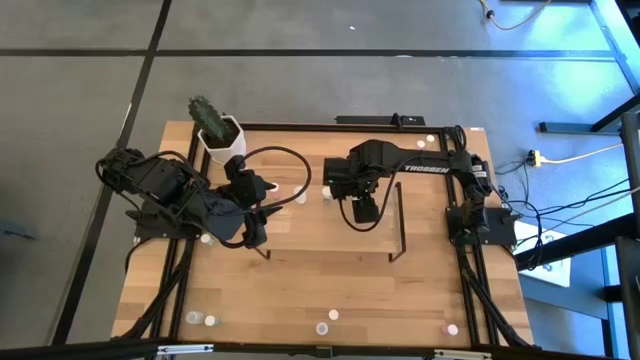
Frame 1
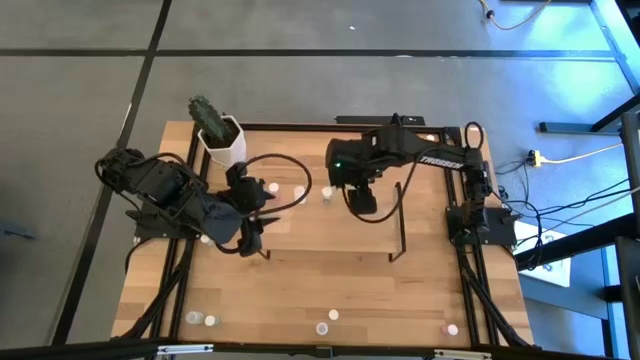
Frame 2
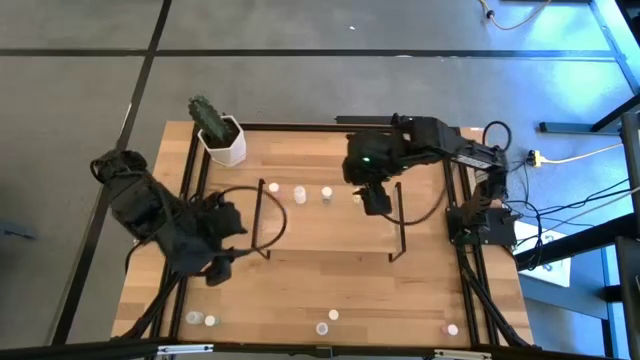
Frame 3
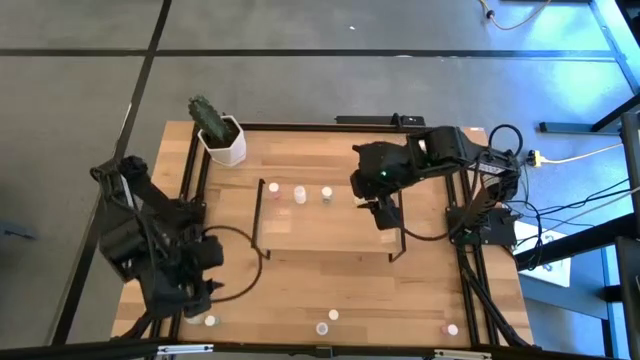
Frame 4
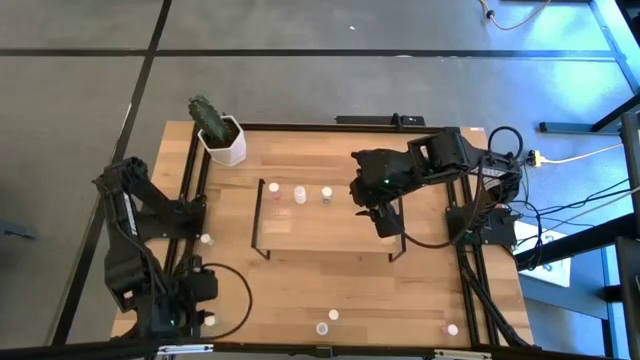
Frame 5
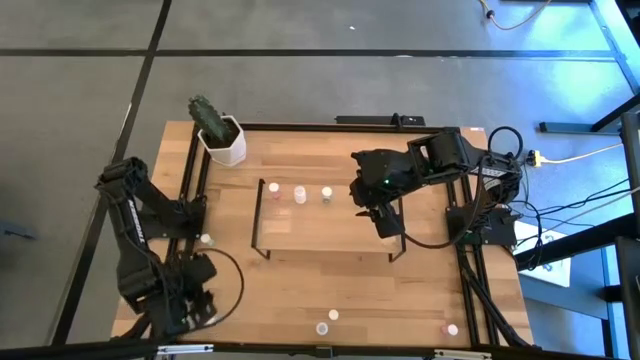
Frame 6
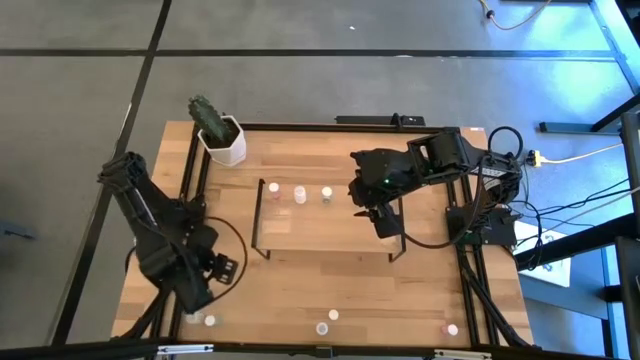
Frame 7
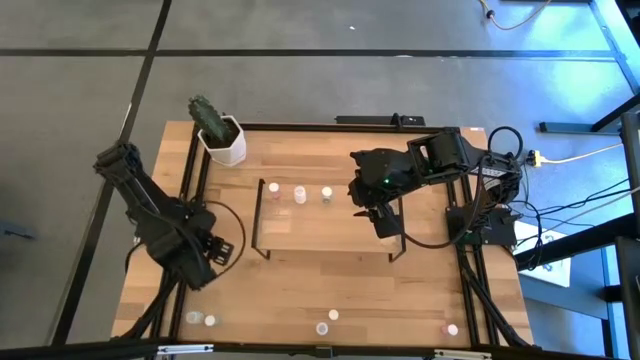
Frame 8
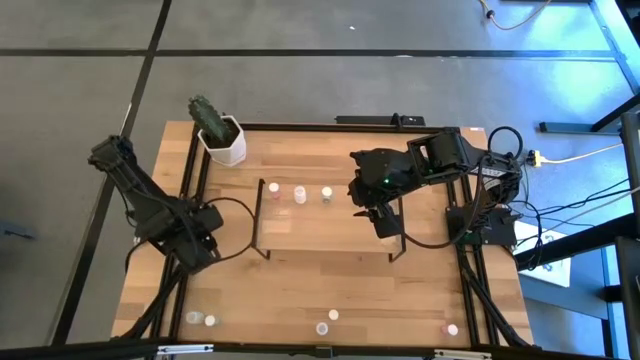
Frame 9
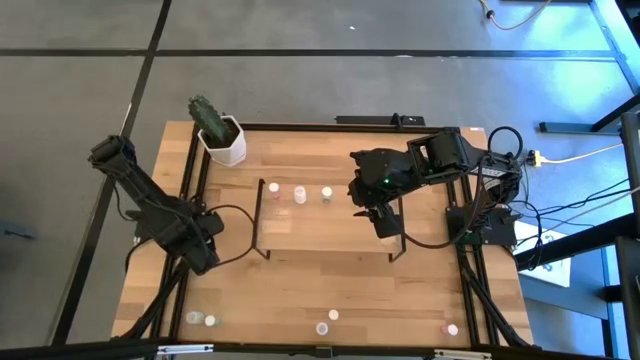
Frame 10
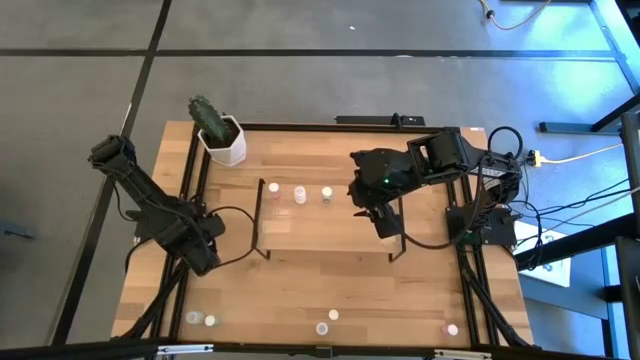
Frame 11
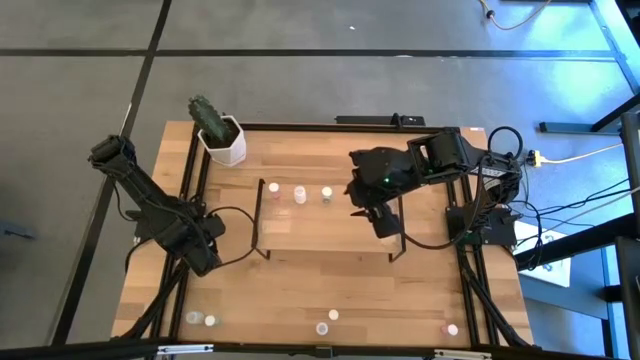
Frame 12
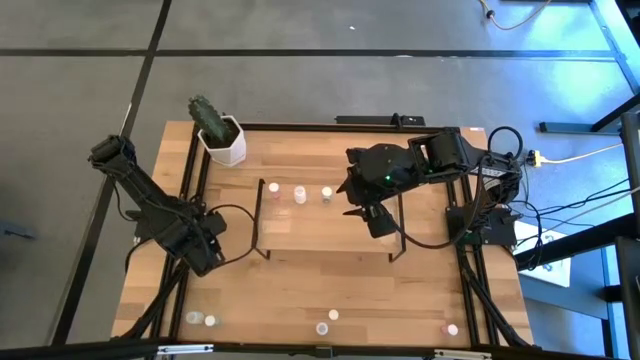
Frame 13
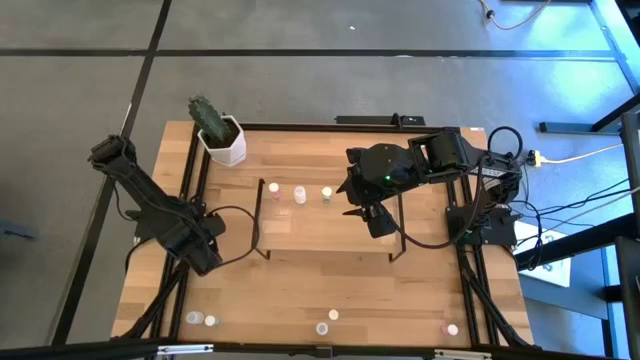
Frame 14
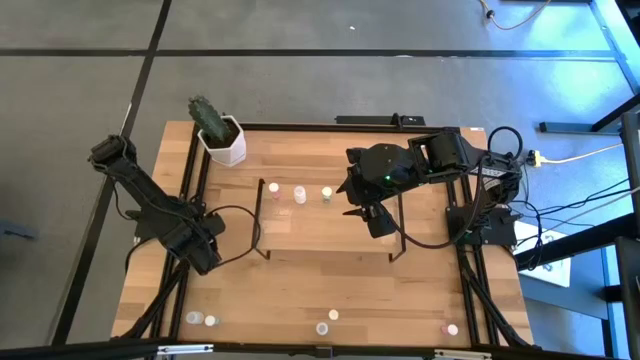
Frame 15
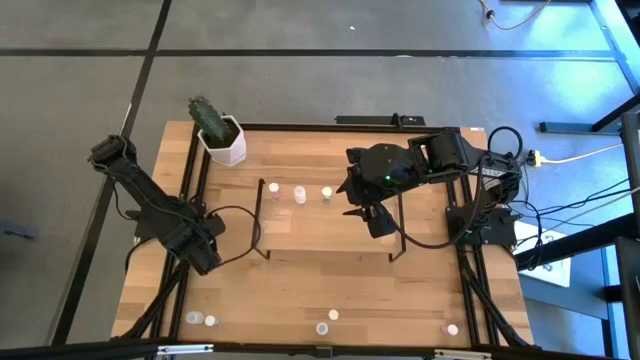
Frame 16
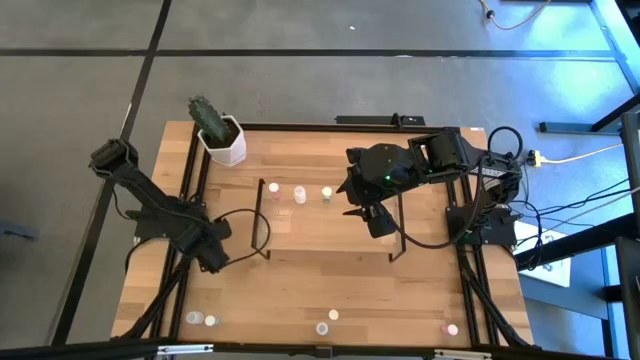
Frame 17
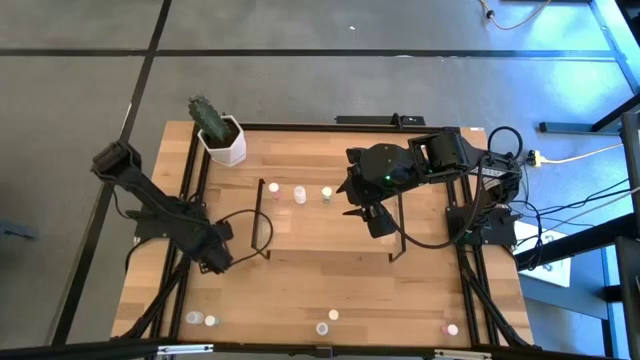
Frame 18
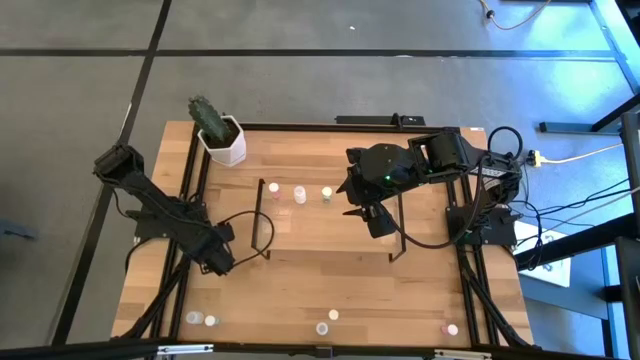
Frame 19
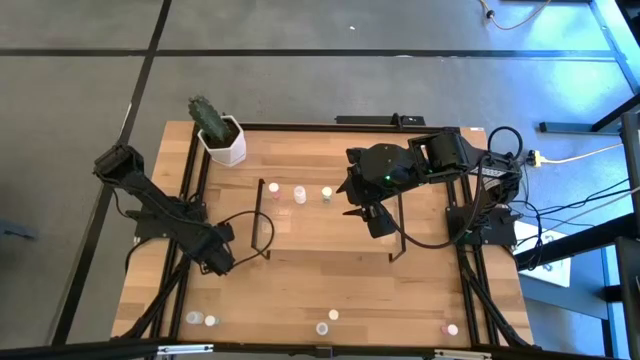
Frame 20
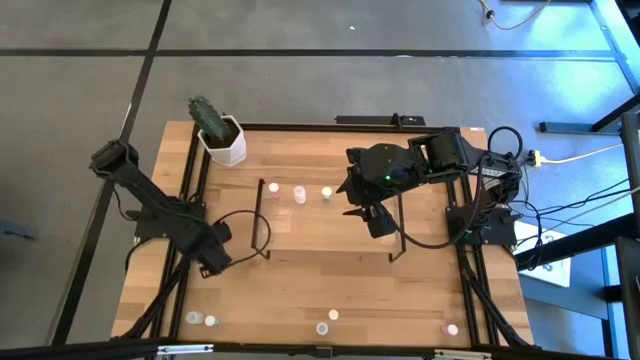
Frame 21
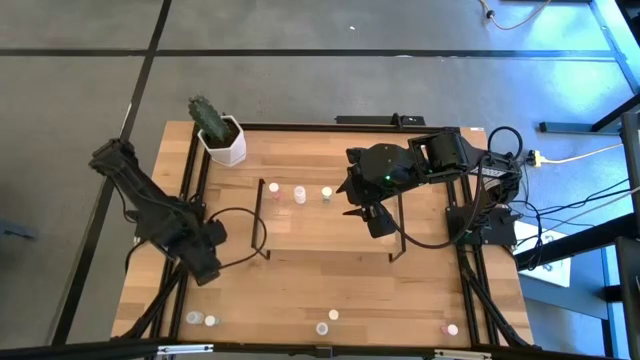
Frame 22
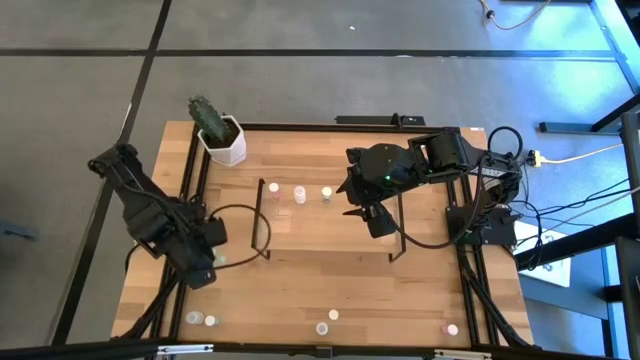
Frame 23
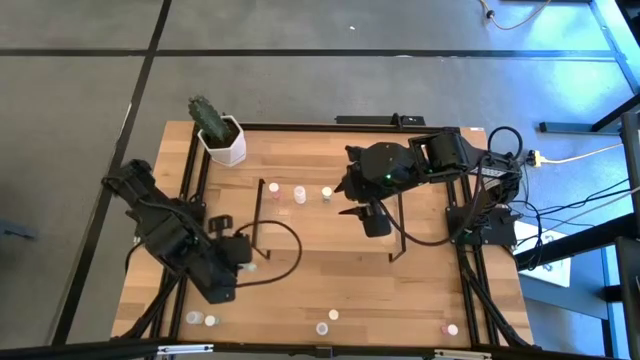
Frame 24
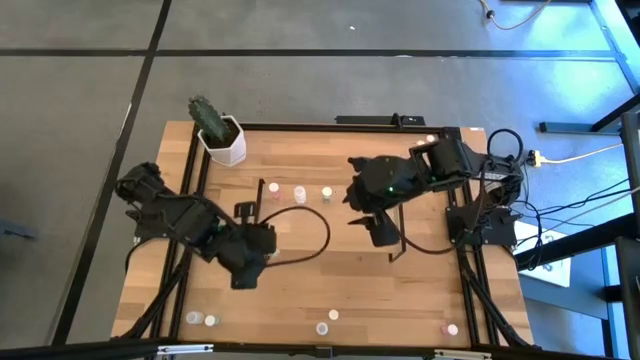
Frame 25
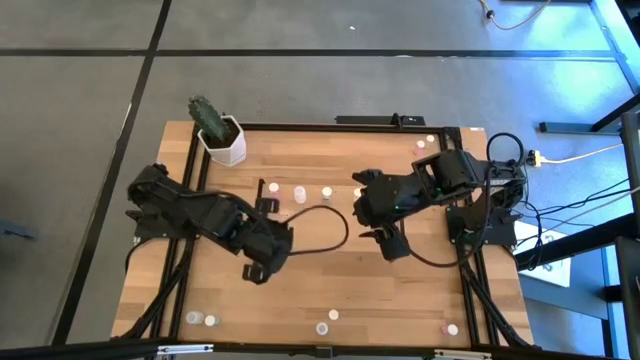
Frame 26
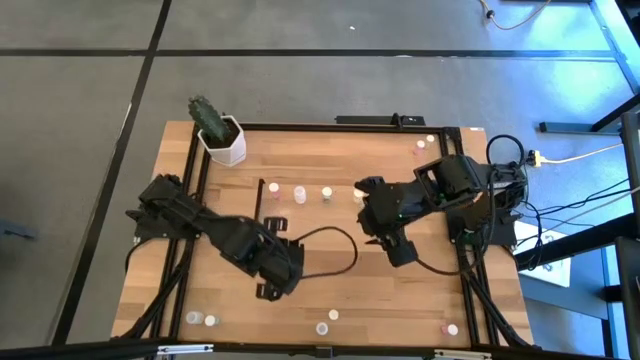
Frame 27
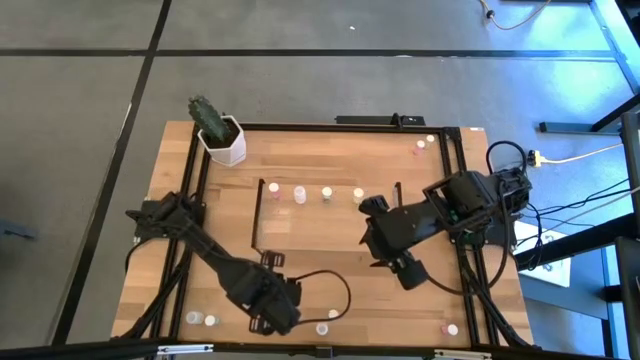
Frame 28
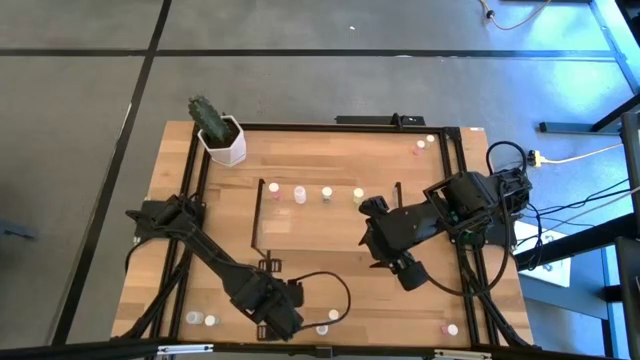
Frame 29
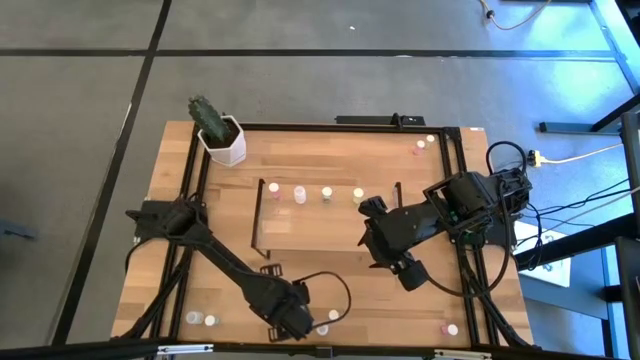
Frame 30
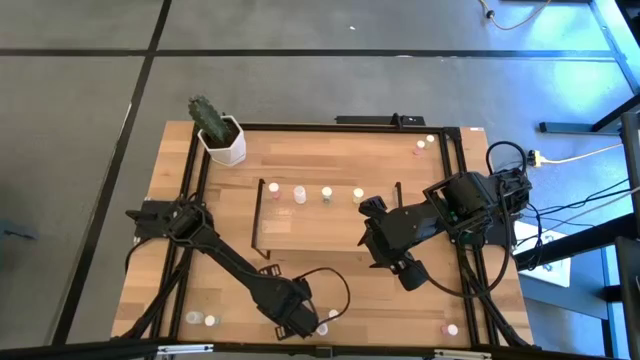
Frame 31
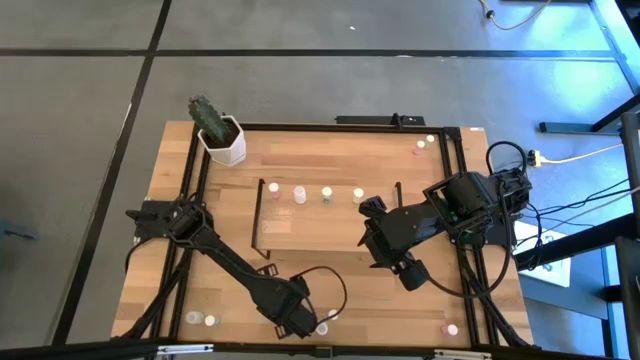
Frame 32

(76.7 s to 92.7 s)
Task: Pick and place medicine bottles onto shelf by color
Put the top blue pill bottle on the shelf aligned with the other blue pill bottle

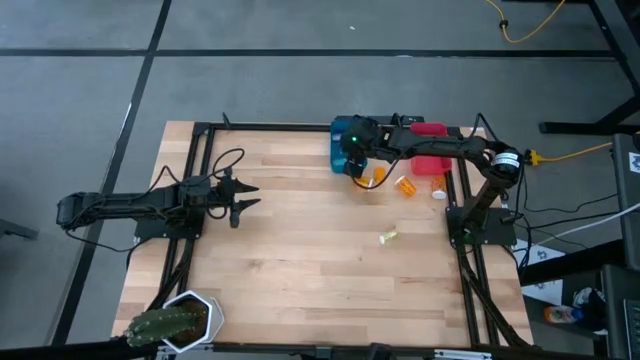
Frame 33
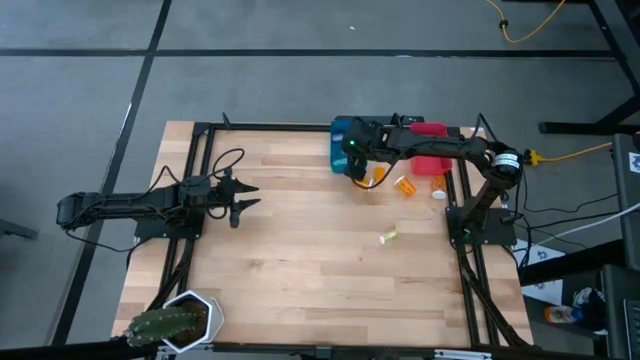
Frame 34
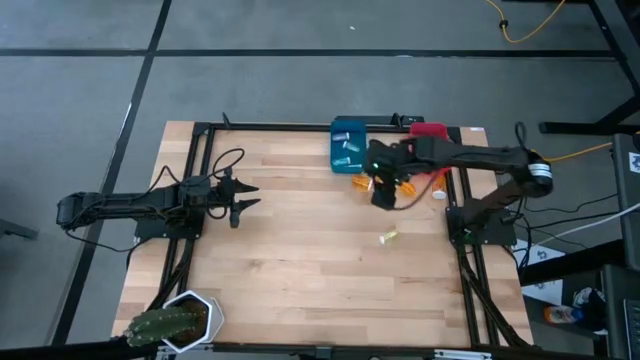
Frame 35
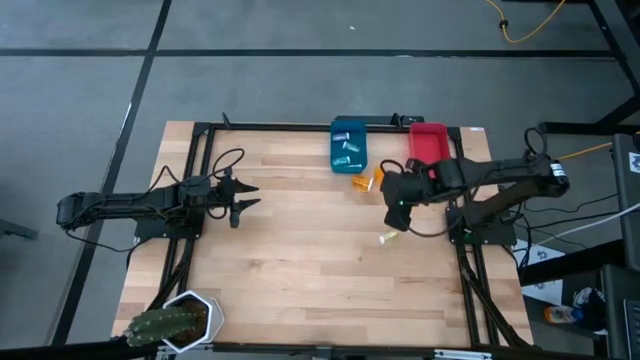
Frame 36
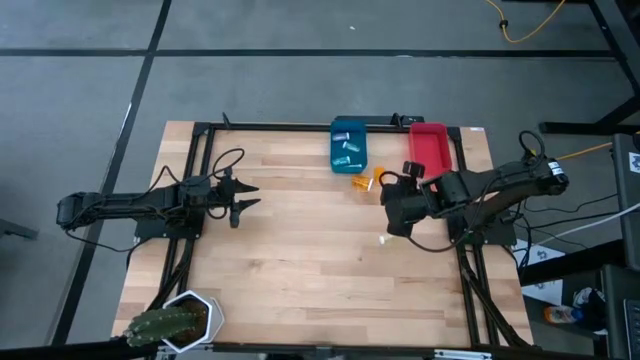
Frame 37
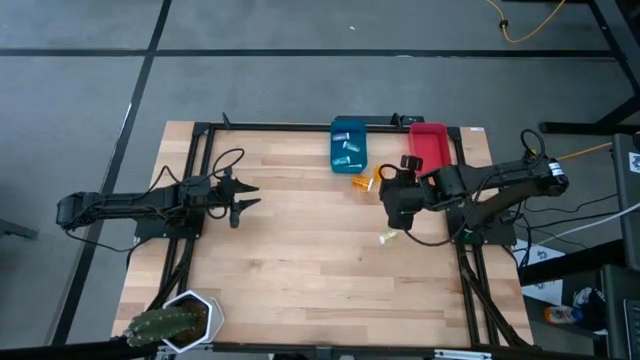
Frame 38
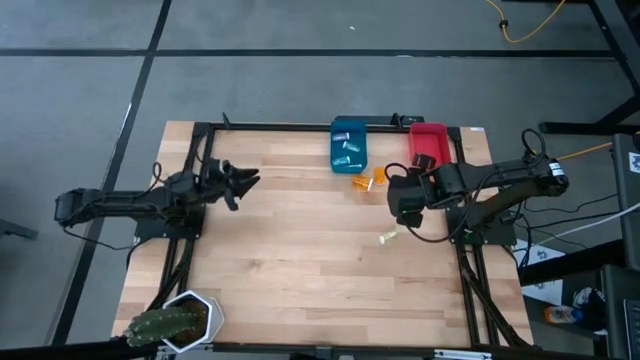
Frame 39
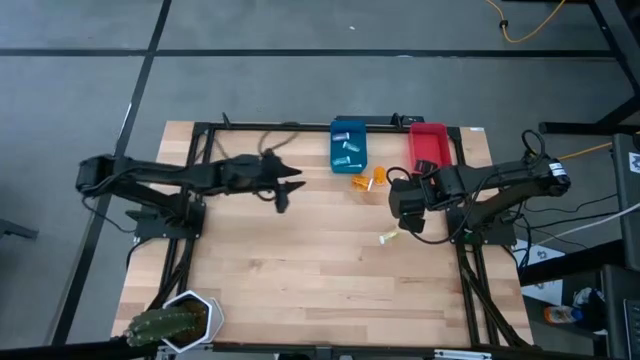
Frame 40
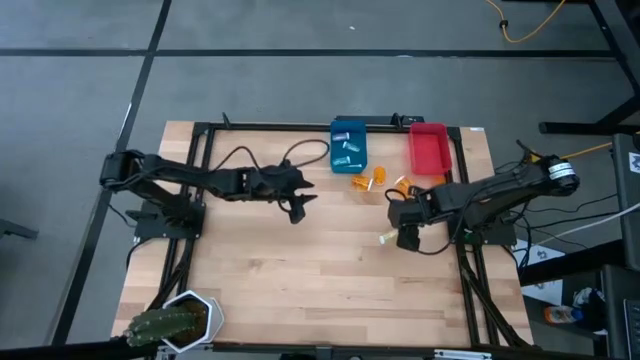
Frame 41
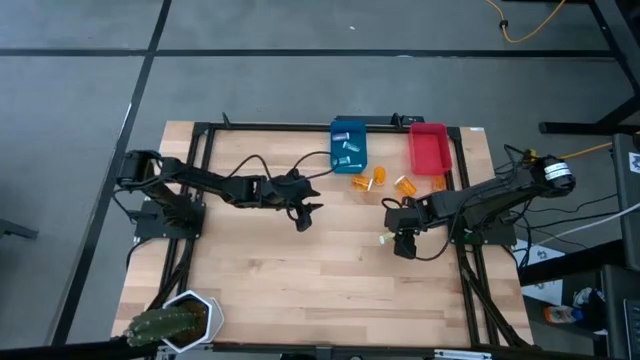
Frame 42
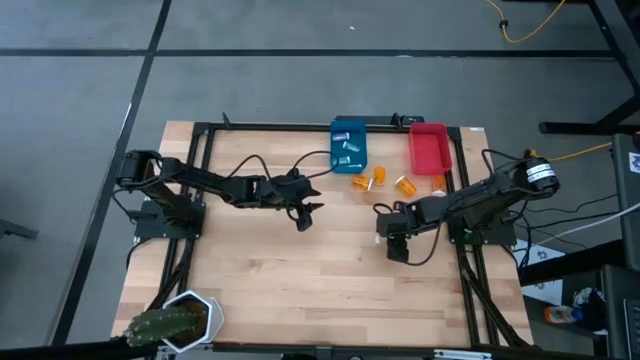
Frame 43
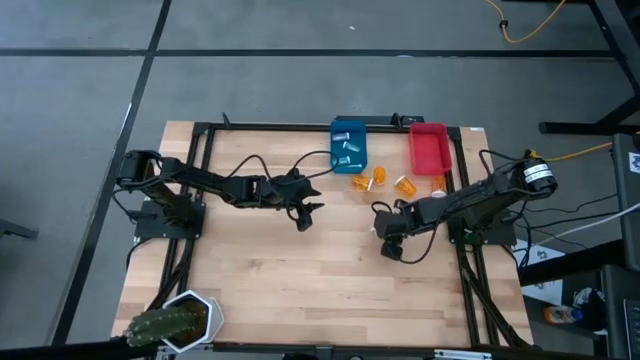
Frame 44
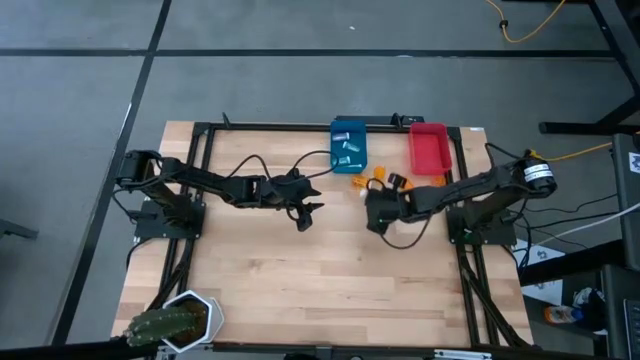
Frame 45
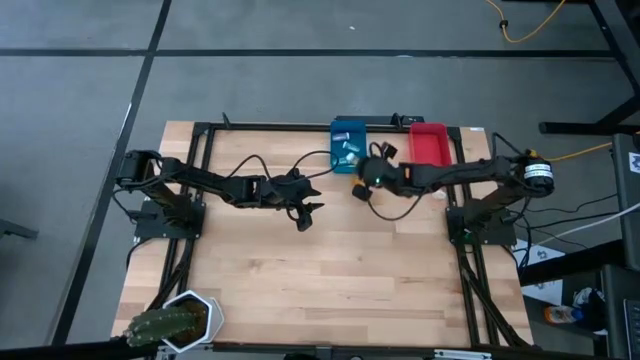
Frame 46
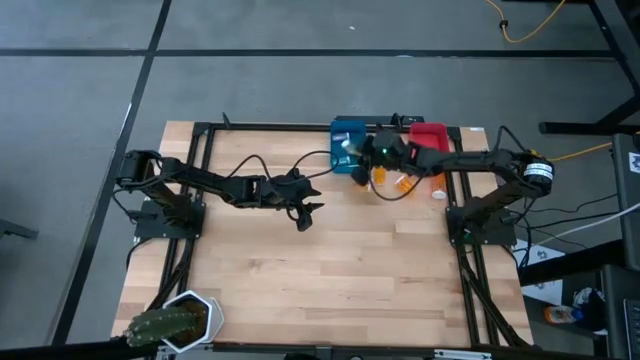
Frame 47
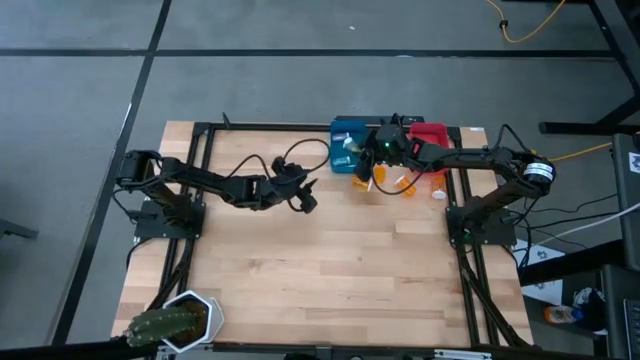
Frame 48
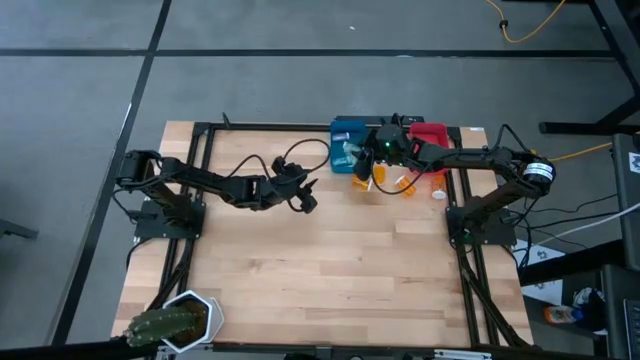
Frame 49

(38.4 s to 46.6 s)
Task: Pick and place medicine bottles into bin by pill shape (circle, oval)
Put the small yellow pill bottle into the blue bin
